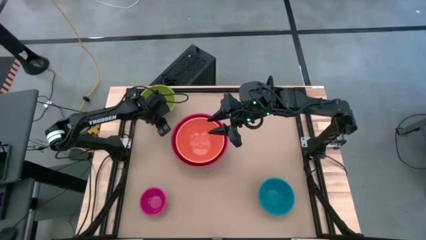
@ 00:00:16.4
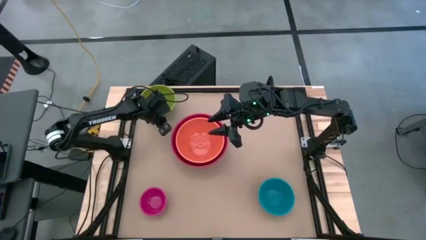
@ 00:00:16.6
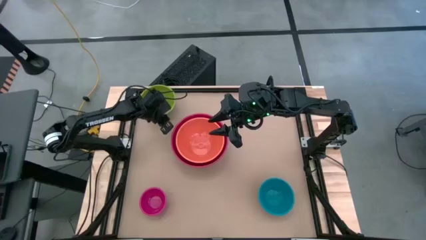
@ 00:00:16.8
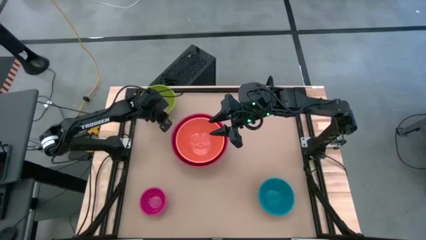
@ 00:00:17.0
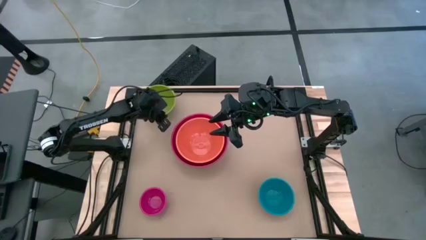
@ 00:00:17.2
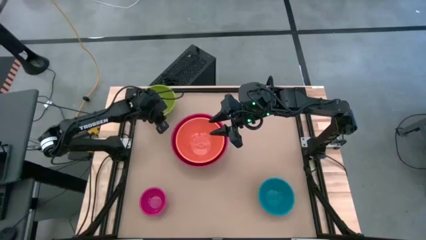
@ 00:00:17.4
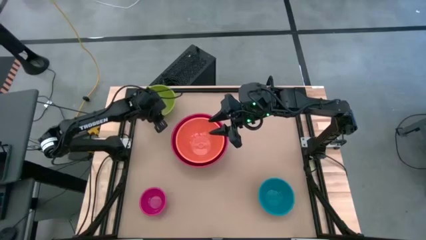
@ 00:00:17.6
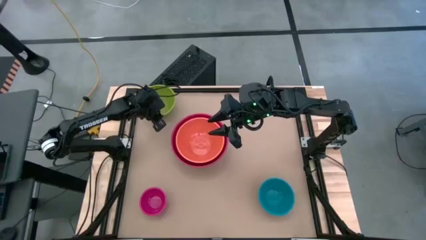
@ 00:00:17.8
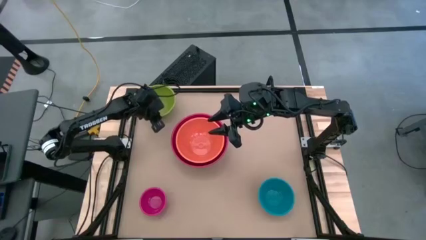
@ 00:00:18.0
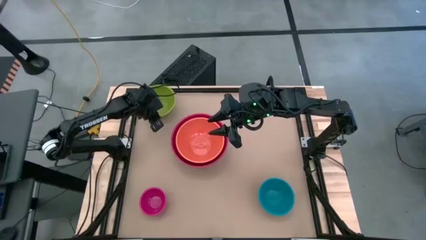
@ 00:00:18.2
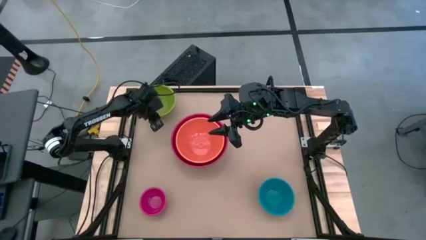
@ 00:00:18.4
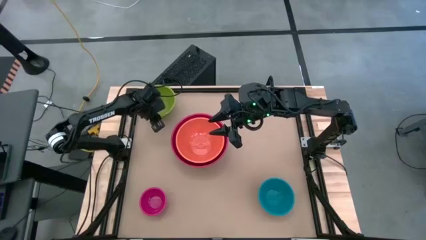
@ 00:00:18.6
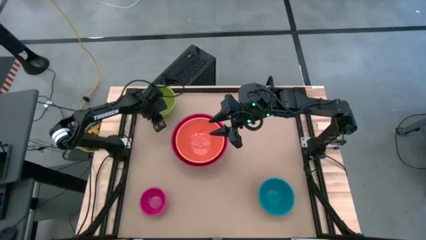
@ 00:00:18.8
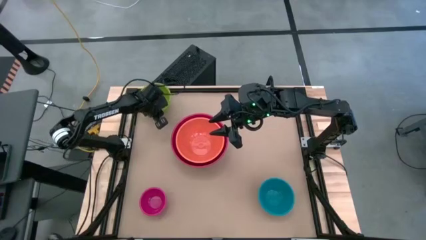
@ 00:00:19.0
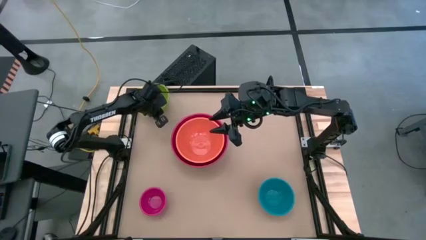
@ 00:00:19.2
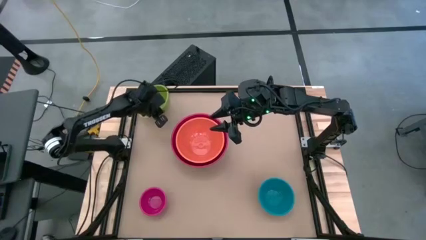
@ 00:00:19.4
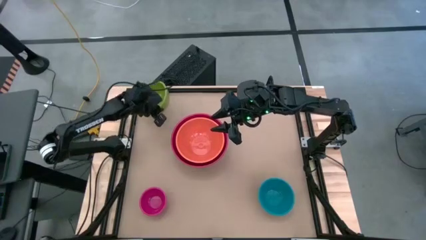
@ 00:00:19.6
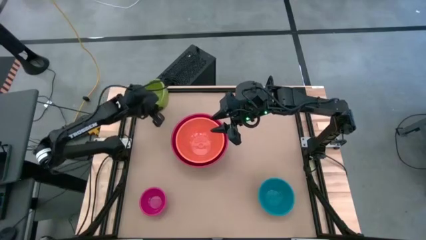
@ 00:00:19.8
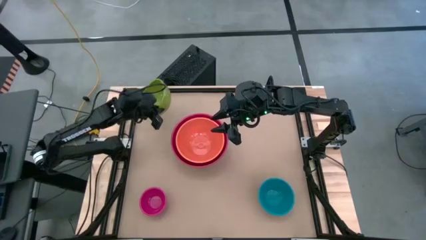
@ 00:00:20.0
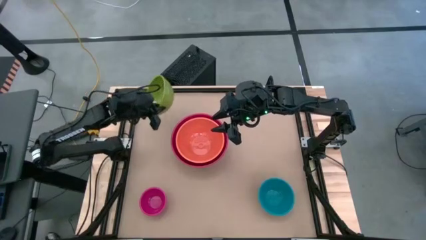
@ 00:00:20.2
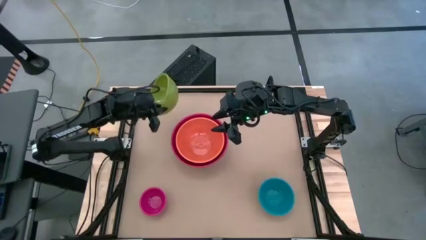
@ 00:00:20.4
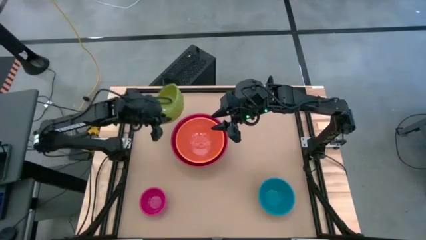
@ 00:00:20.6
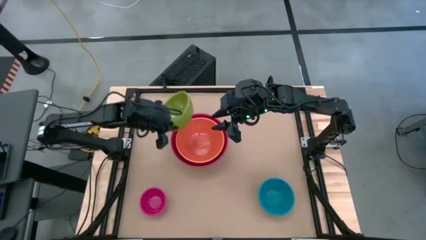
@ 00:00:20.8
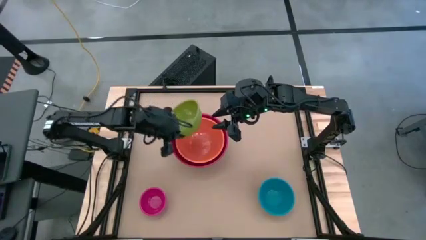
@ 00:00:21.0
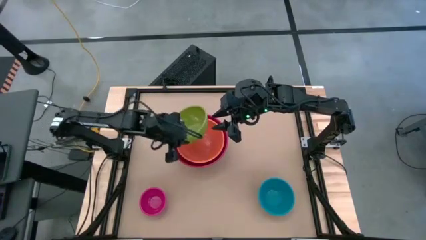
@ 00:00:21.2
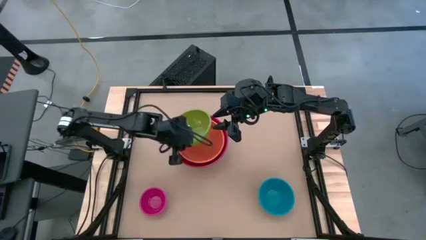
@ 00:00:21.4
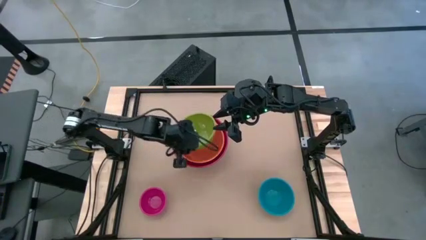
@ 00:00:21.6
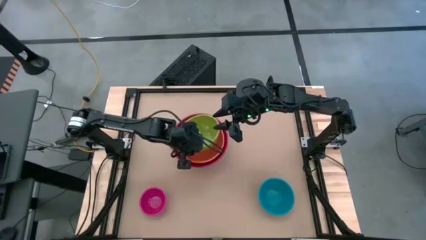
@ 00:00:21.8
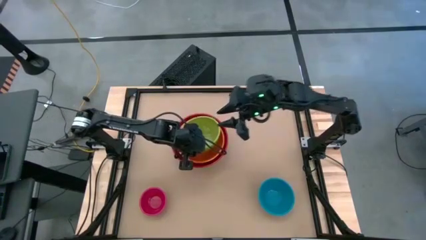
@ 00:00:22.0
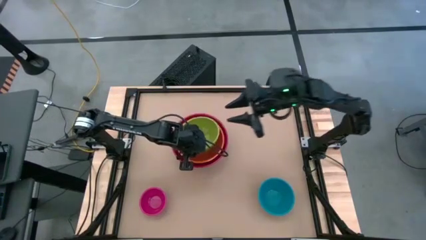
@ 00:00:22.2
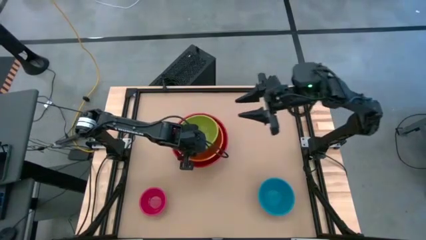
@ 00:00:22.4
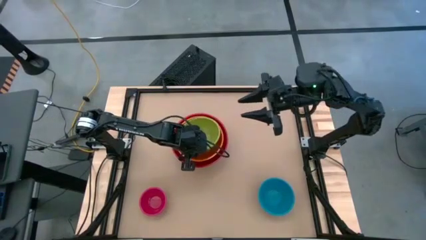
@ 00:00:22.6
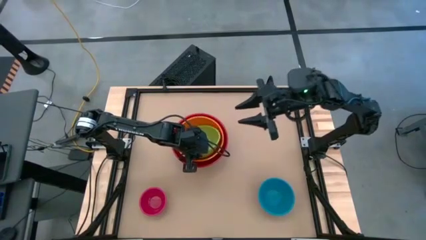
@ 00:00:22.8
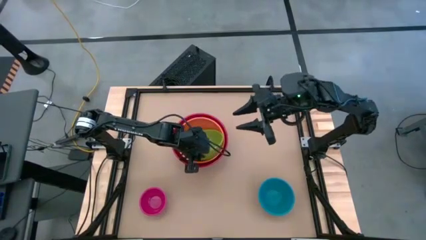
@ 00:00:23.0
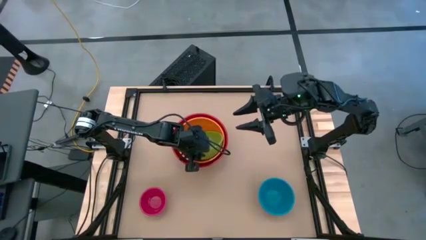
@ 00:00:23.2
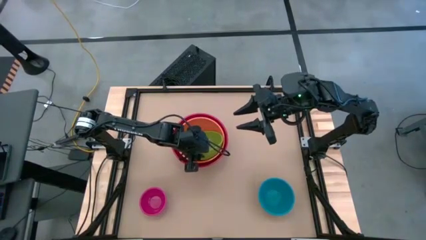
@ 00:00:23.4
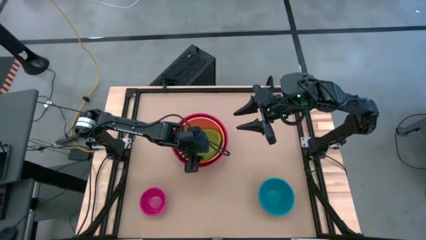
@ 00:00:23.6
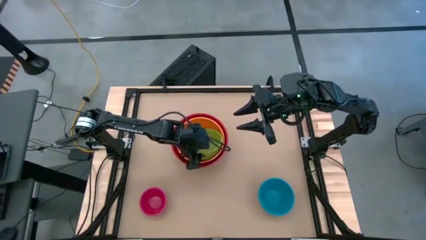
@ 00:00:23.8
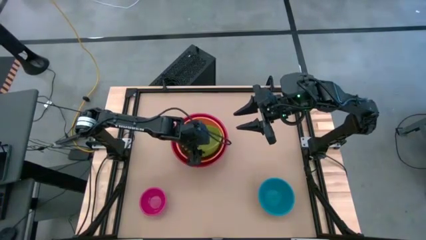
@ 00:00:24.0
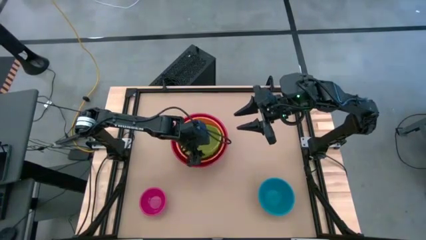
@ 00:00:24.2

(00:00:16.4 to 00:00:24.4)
Stack the green bowl on top of the orange bowl

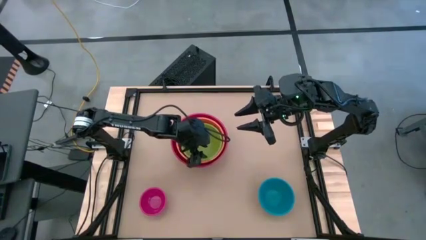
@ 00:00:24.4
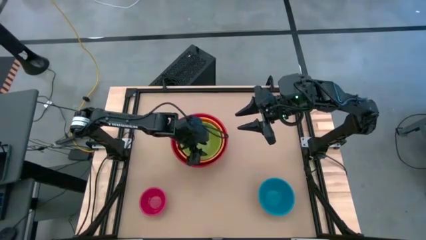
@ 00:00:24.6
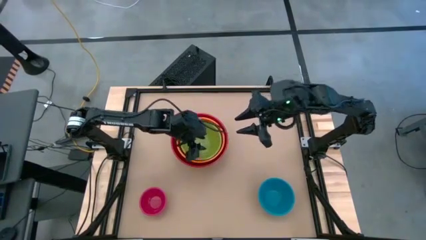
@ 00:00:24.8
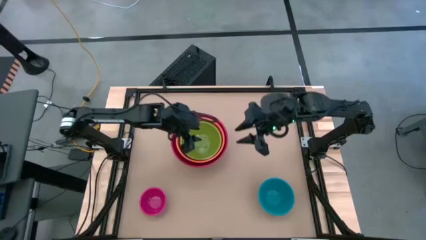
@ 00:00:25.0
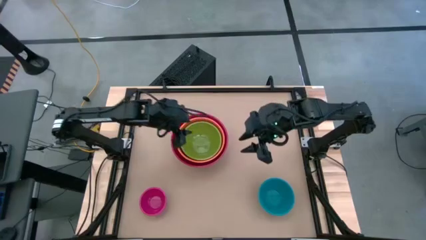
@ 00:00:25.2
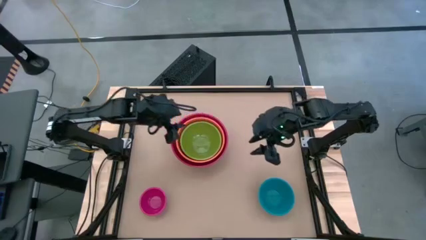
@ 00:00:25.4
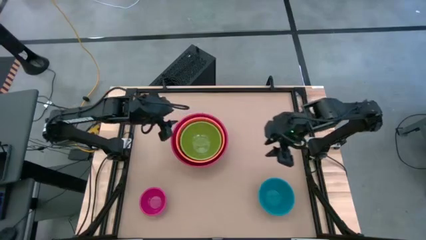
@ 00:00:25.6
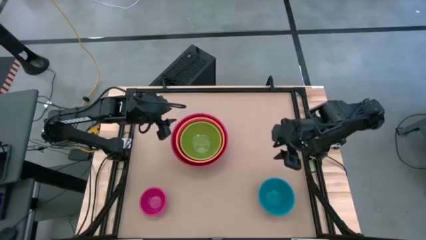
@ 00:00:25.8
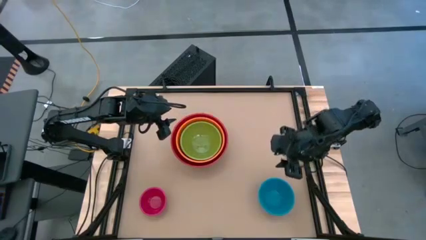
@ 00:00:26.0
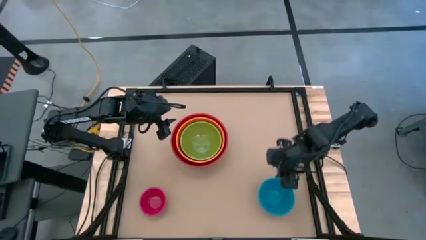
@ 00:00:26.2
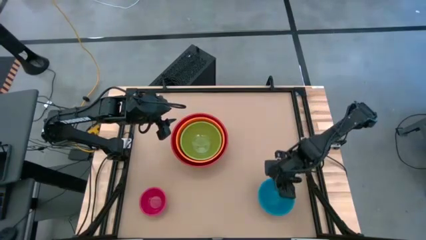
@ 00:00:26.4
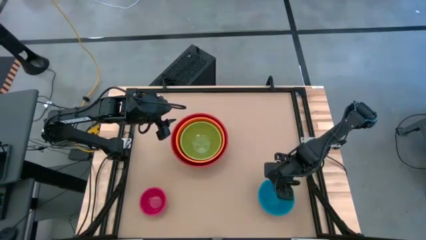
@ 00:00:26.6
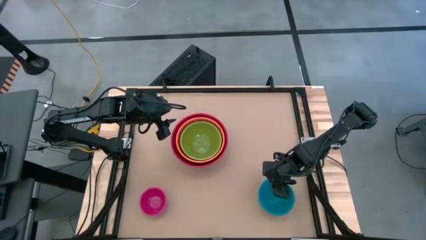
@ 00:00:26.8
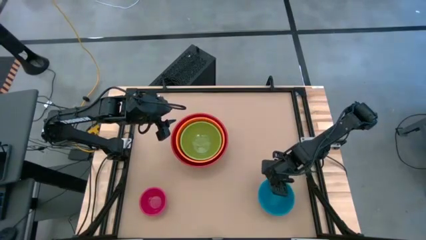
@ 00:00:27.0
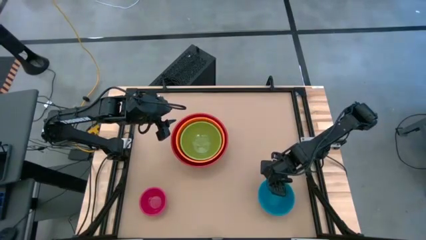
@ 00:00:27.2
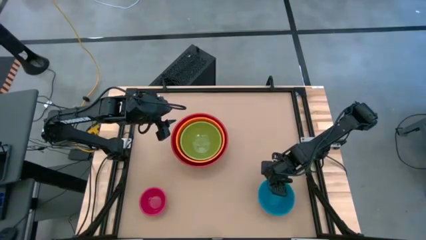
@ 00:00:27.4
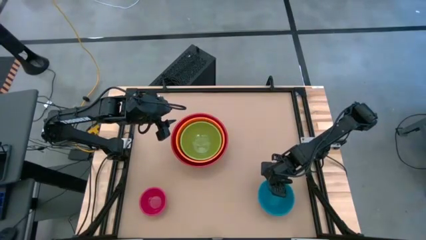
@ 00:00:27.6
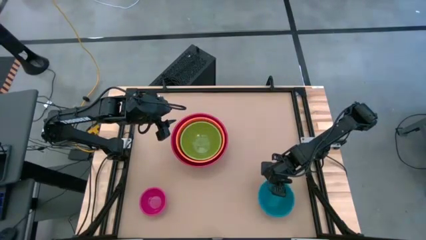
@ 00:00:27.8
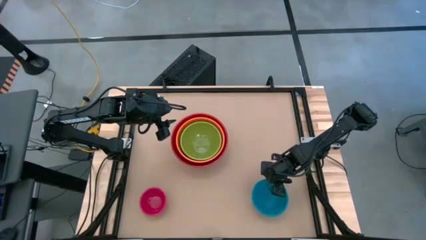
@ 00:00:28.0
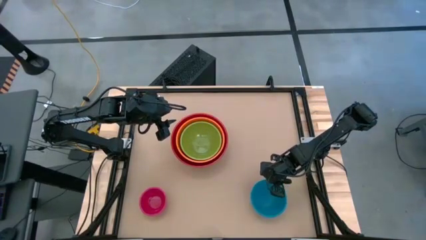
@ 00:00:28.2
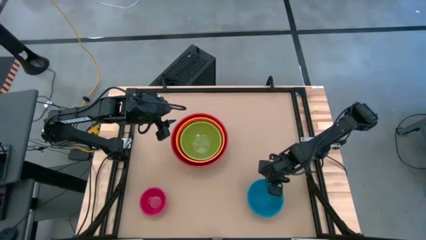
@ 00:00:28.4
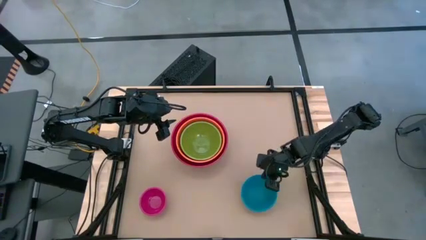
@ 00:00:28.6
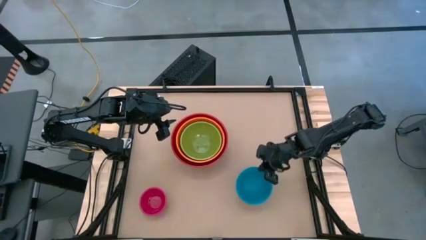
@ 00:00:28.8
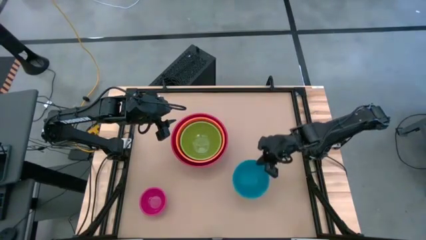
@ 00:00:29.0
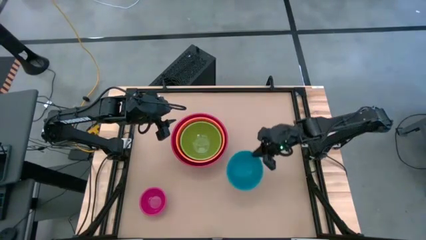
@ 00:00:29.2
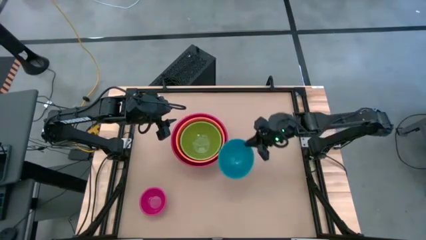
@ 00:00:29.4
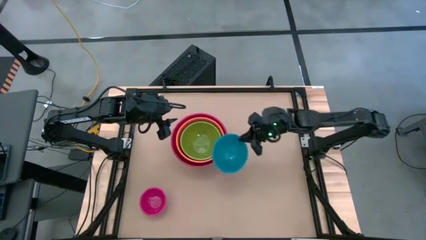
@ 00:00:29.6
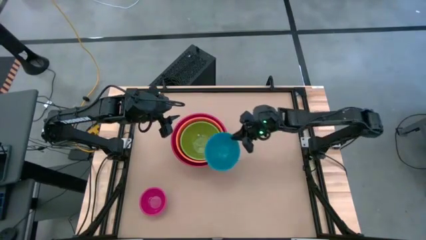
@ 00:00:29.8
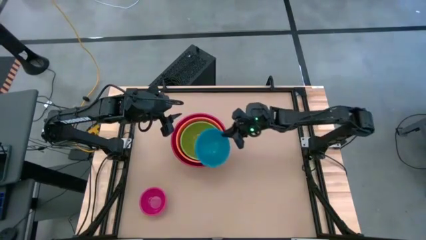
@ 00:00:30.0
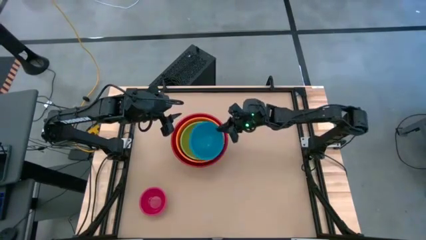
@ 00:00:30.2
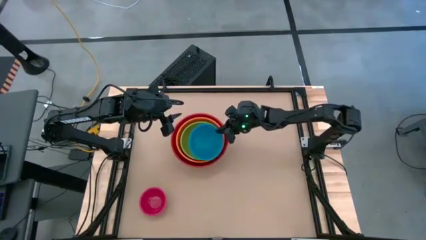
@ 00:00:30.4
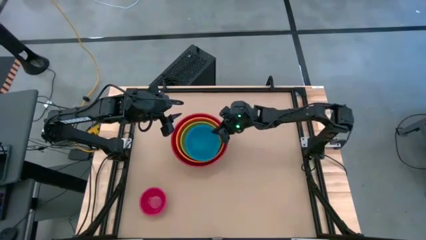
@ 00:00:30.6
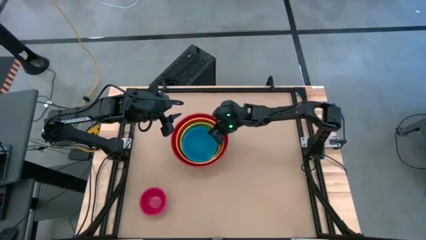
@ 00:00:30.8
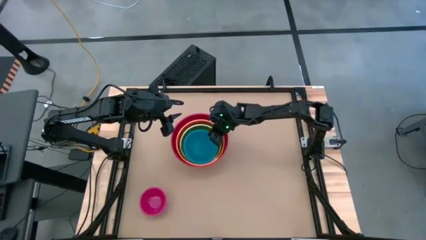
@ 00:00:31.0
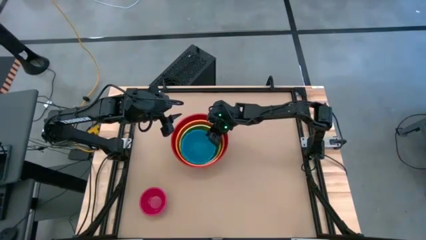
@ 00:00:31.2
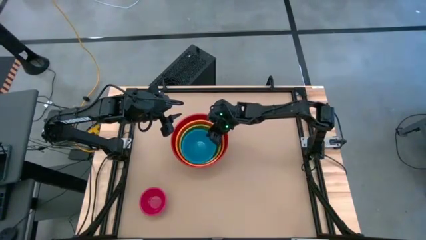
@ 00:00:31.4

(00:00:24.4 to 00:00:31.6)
Stack the blue bowl on top of the green bowl
